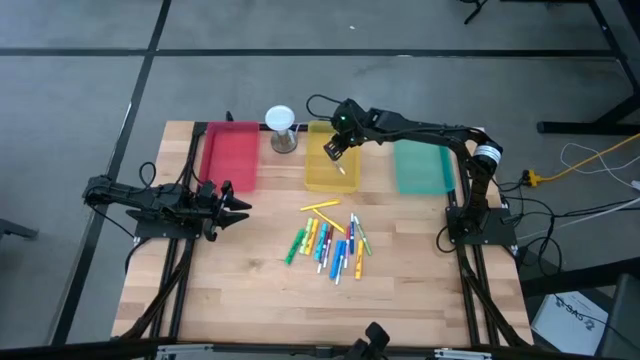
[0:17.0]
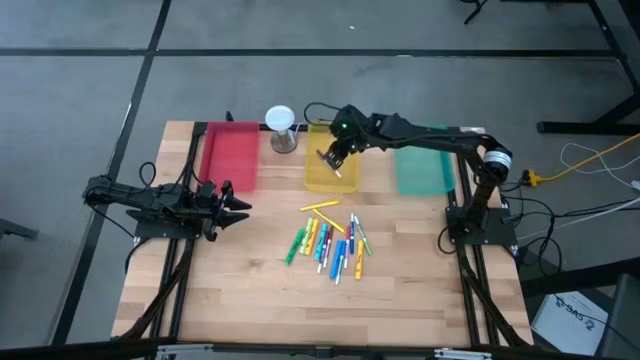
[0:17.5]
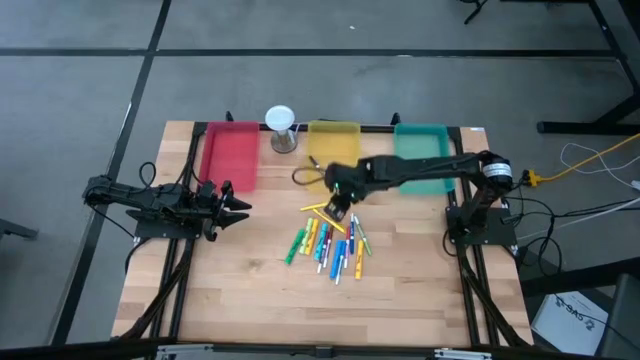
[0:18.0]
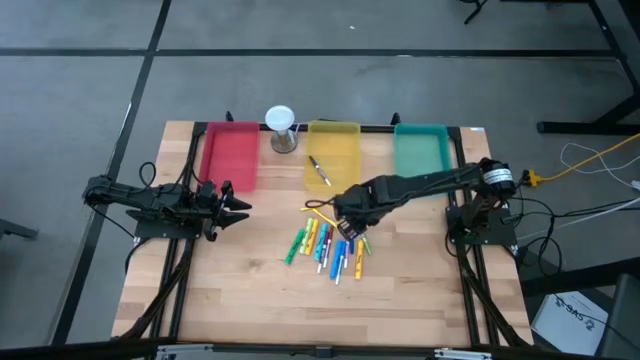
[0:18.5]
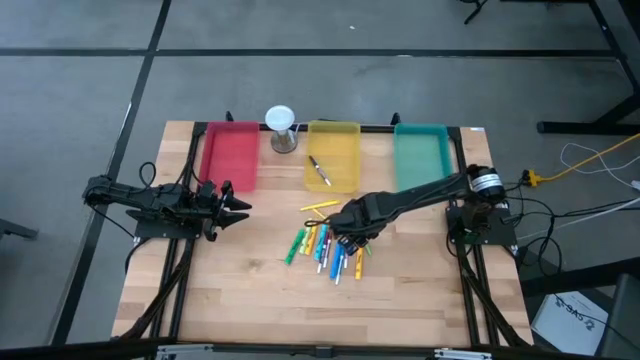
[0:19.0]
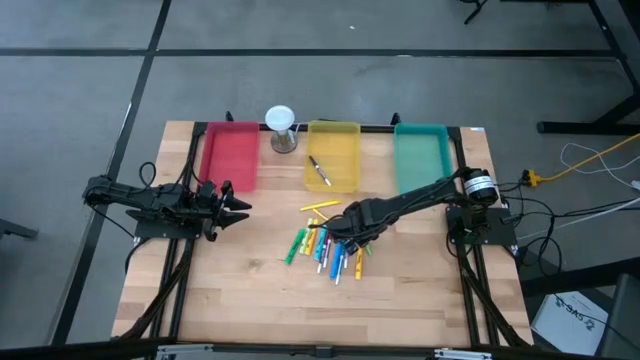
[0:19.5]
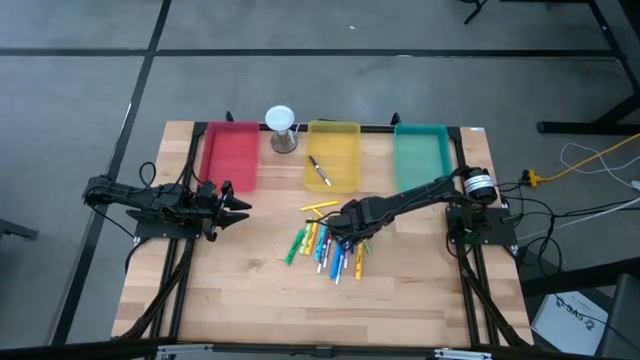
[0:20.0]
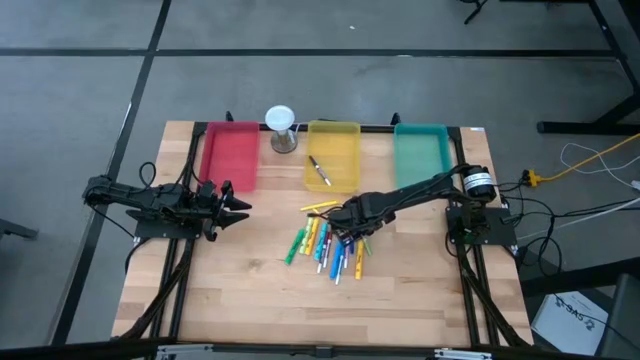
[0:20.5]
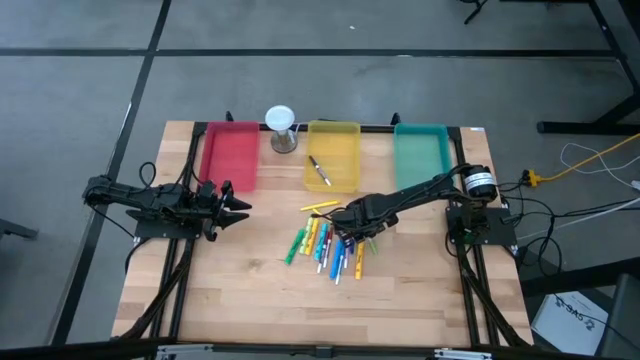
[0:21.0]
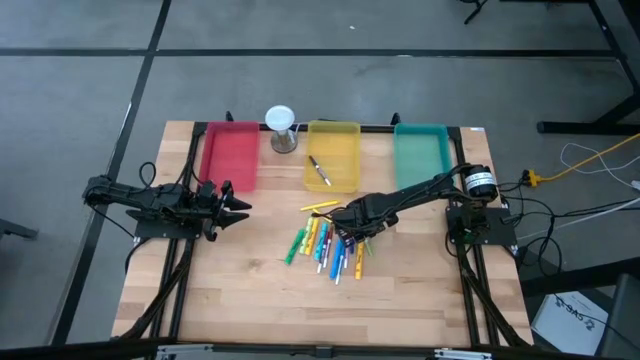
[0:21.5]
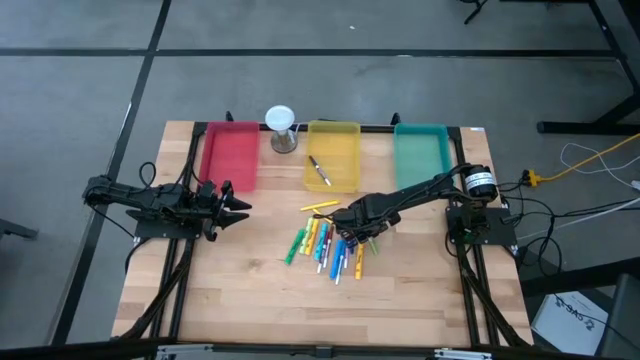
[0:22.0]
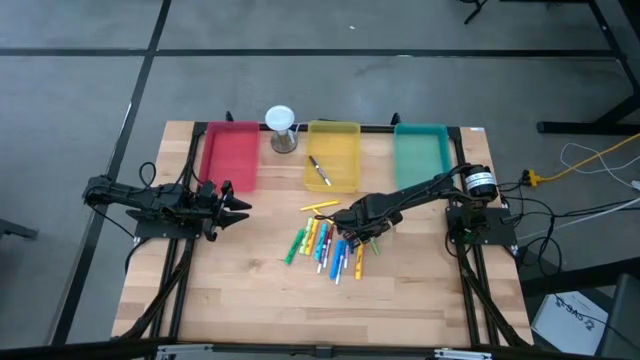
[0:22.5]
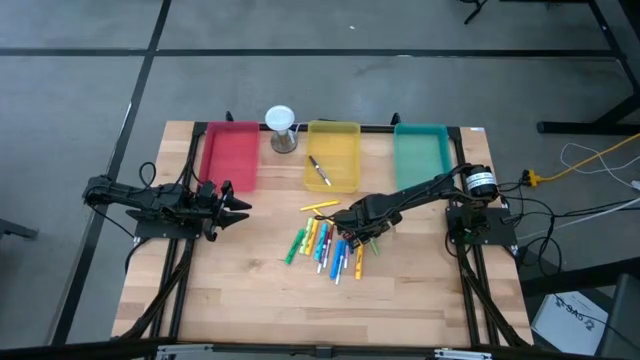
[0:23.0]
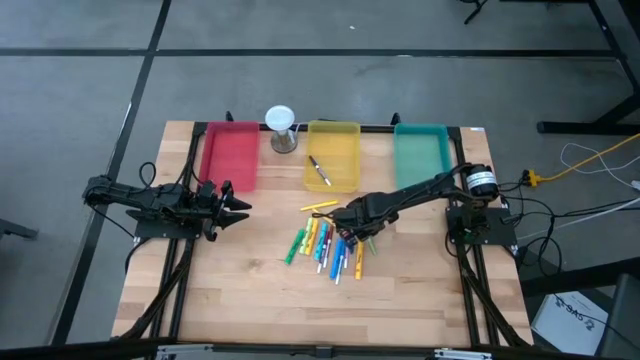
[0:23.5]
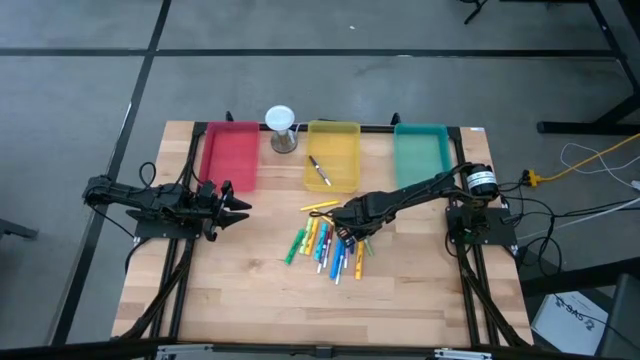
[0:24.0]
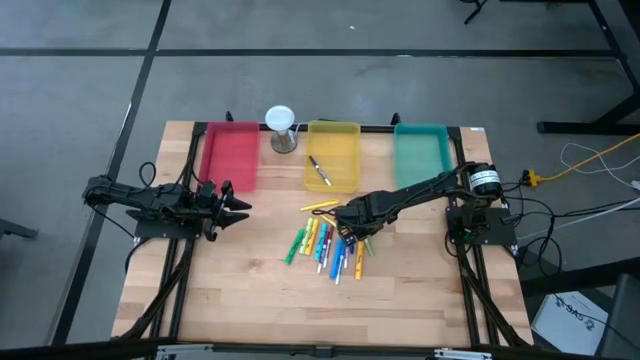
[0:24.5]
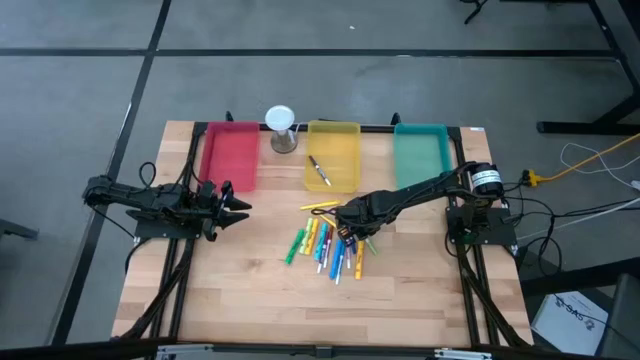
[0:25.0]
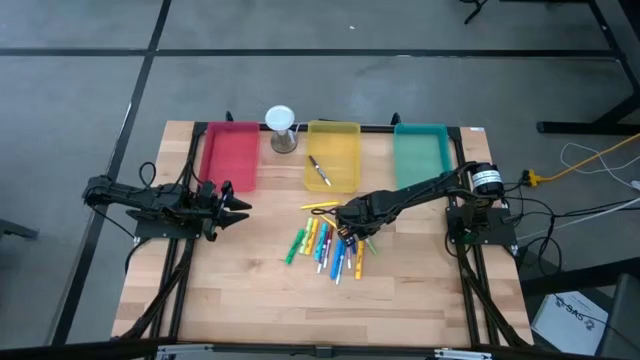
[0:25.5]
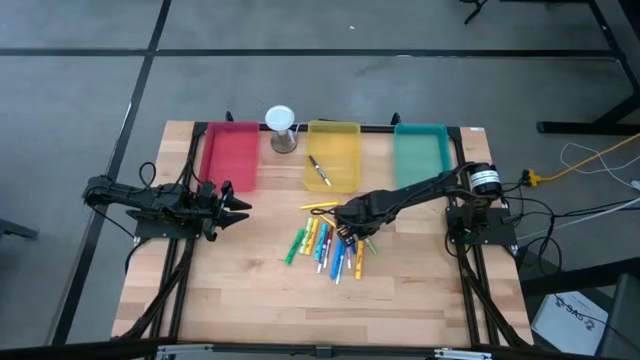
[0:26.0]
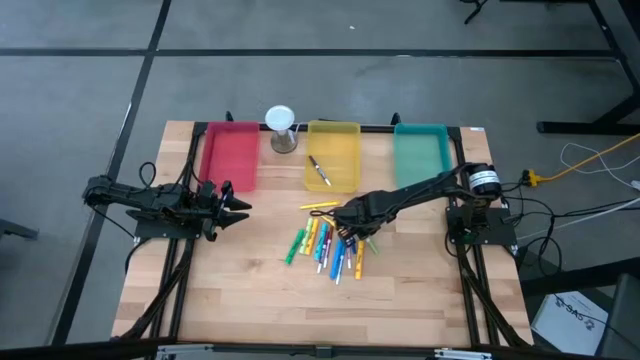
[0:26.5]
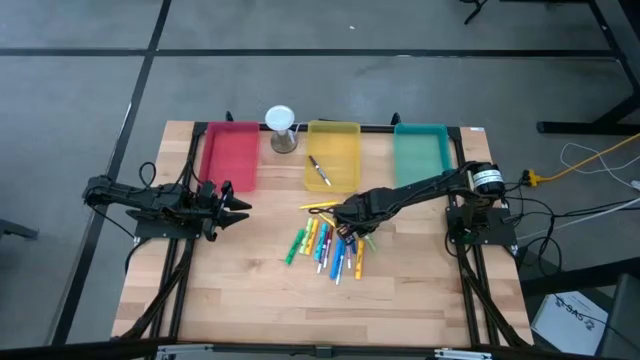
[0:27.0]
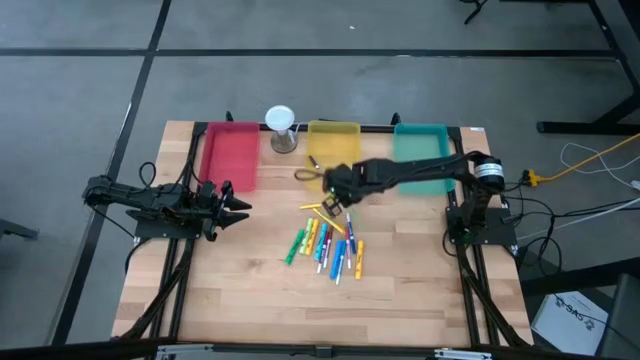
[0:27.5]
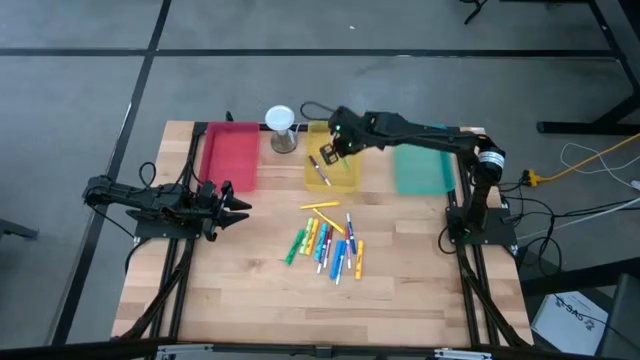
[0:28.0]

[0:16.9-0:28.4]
Task: Pick & Place Markers
Put the green marker into the yellow bin

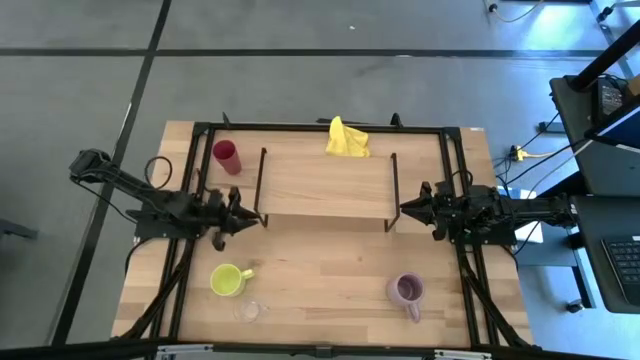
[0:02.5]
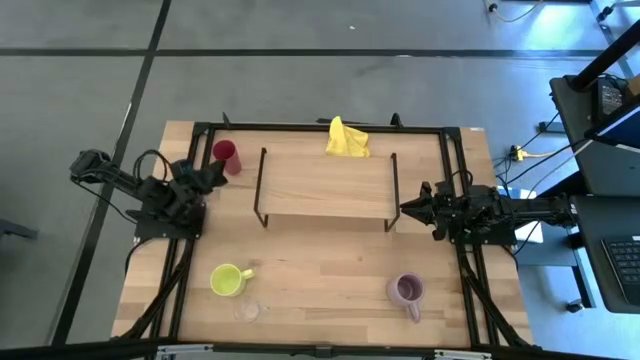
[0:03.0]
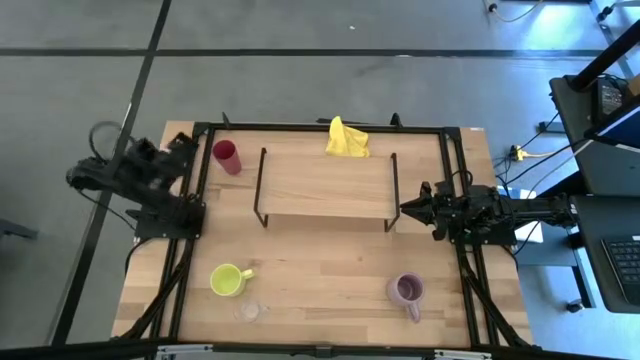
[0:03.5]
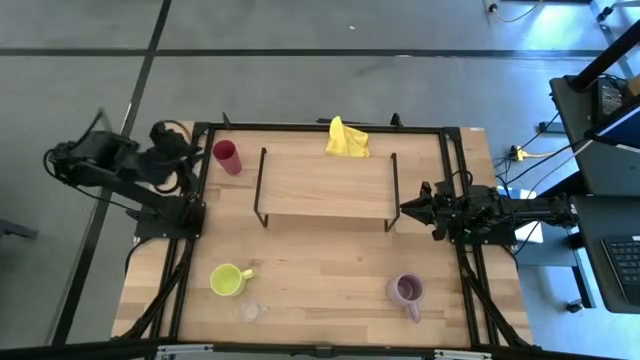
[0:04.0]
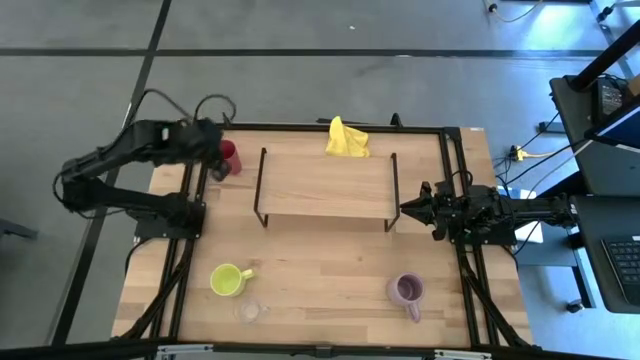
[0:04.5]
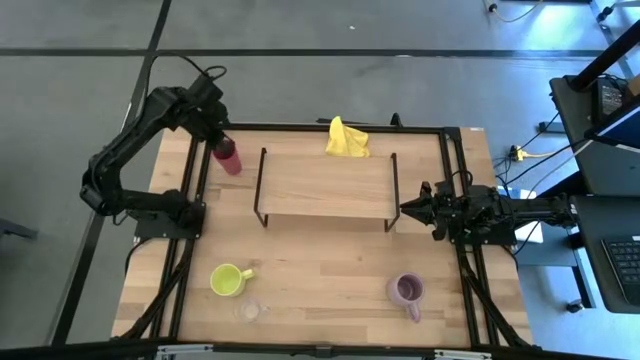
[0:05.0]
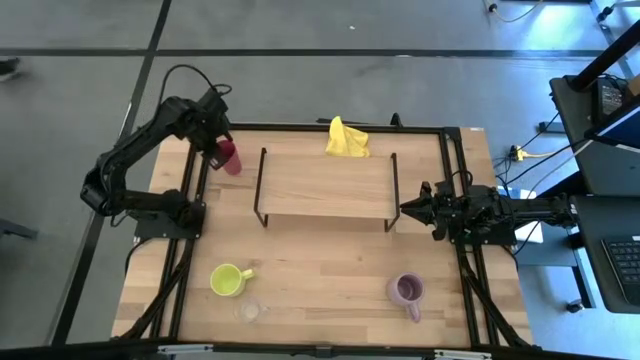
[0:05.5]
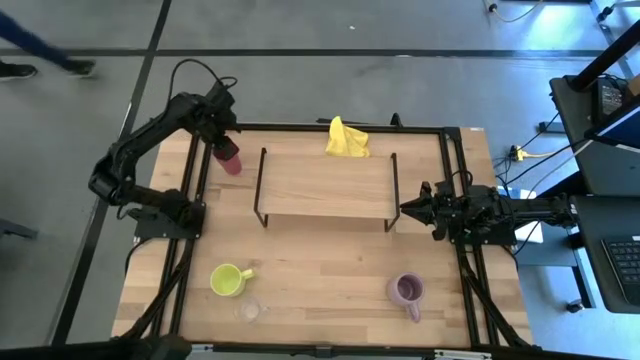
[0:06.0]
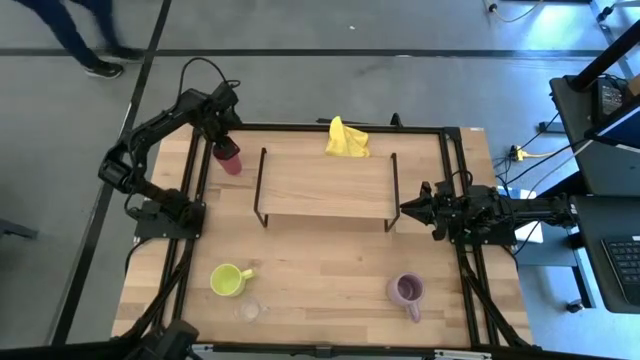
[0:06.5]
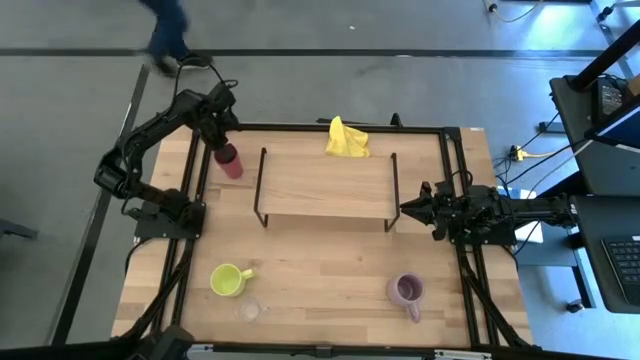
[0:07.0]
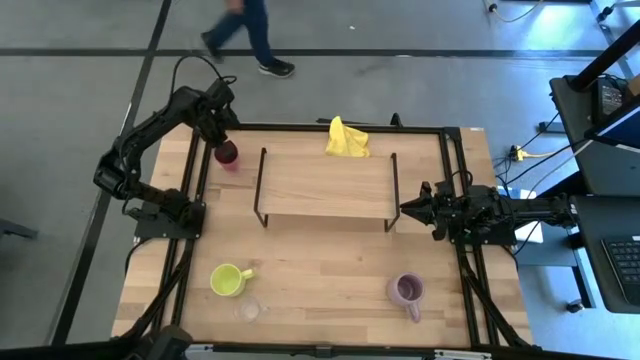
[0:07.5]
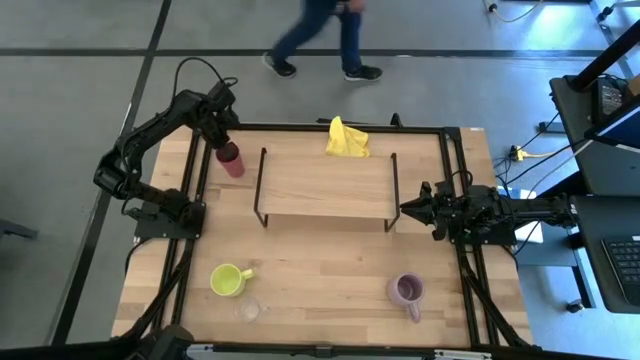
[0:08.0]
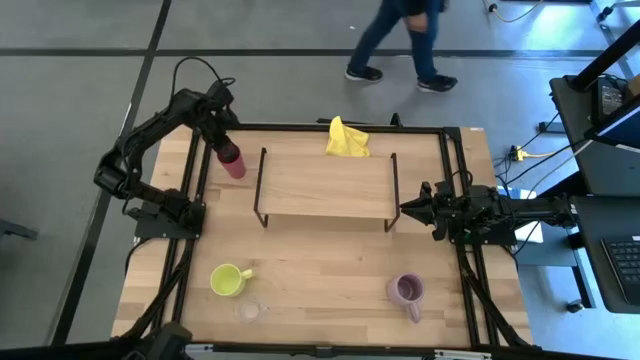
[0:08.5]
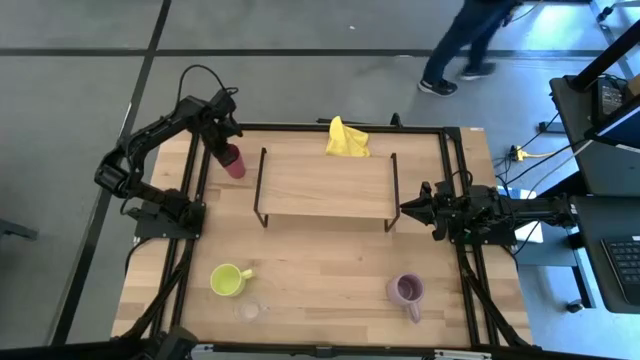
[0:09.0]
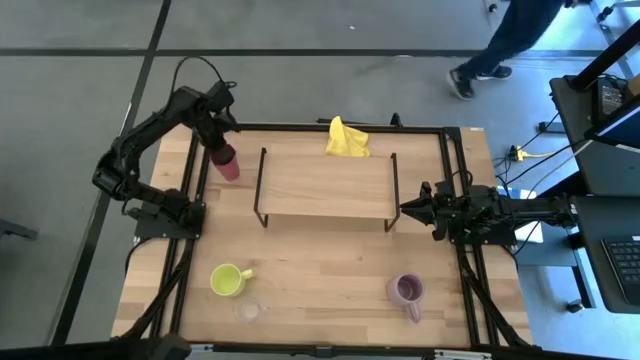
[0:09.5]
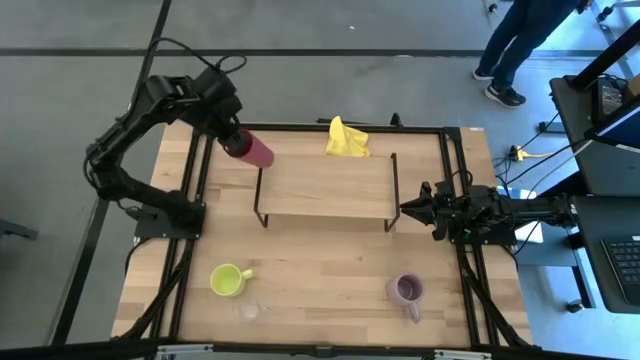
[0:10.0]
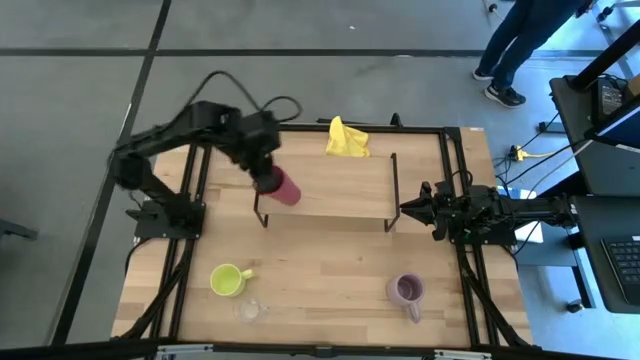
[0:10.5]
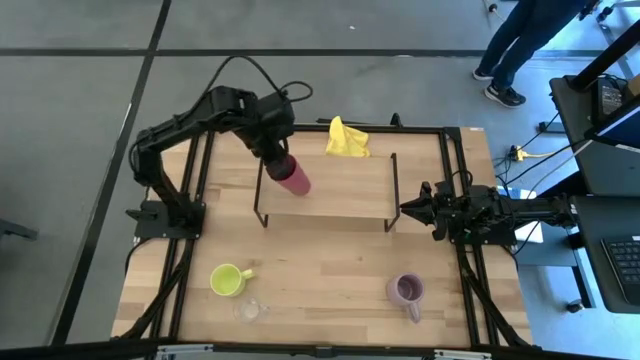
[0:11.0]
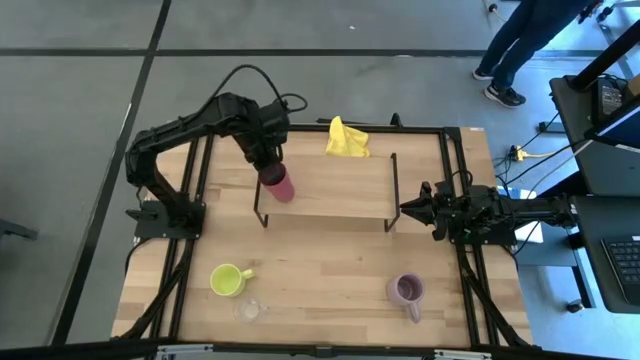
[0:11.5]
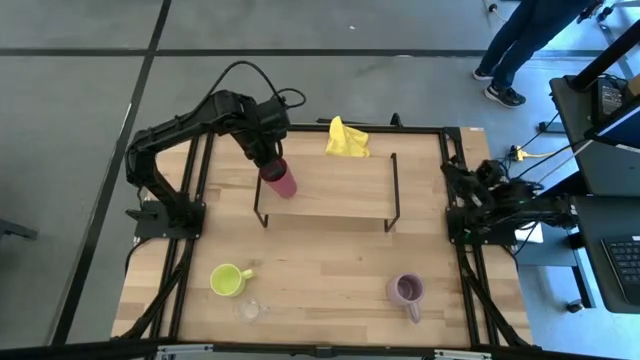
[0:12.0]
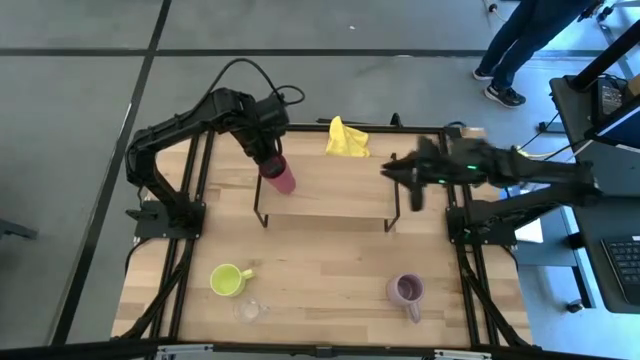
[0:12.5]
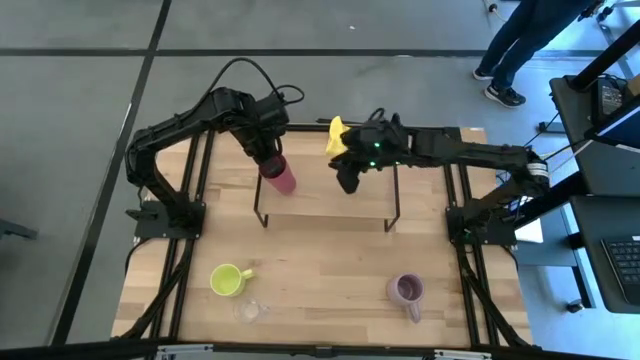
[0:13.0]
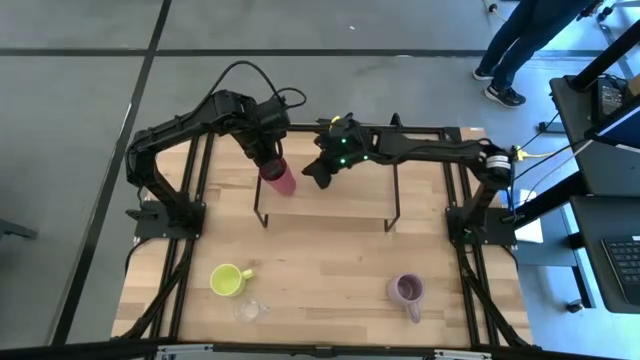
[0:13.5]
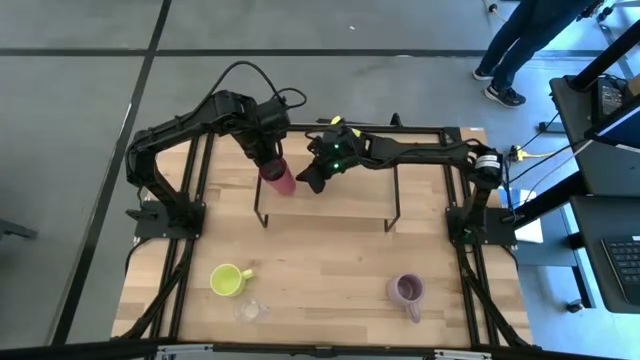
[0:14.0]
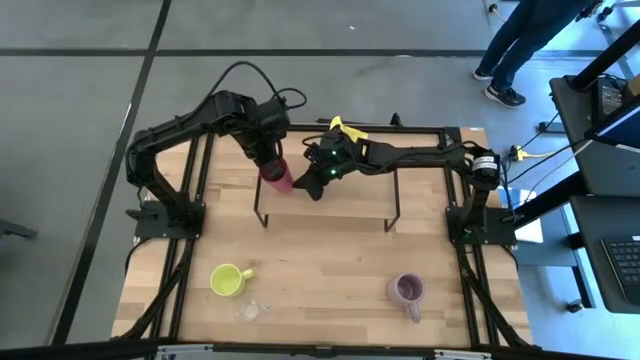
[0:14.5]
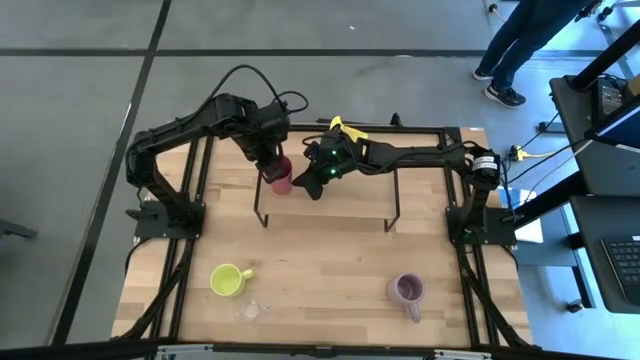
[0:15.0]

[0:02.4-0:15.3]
Task: Stack small to large cups/mugs on shelf
Put the pink cup on the shelf
